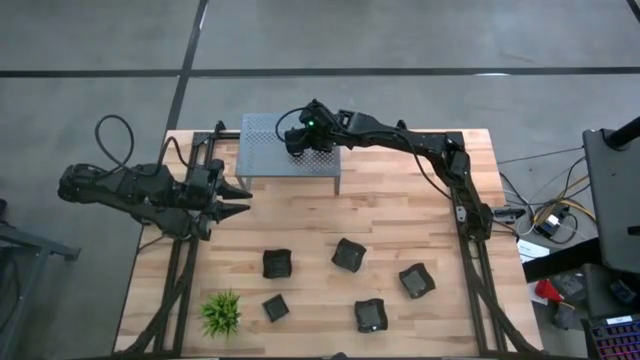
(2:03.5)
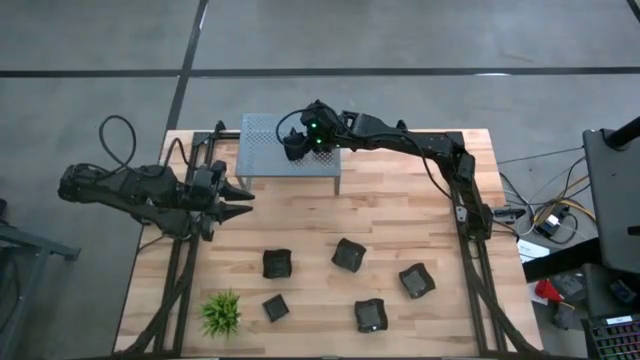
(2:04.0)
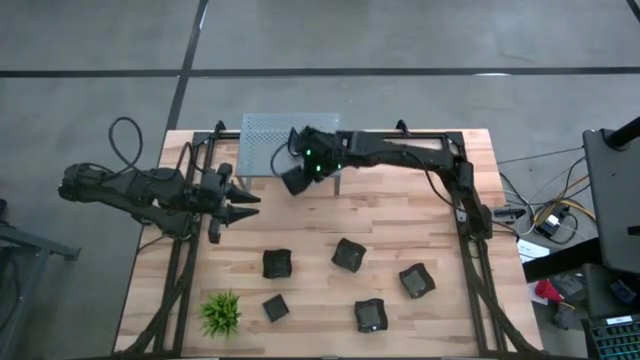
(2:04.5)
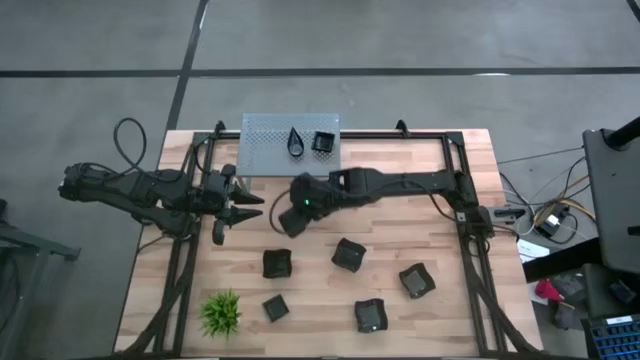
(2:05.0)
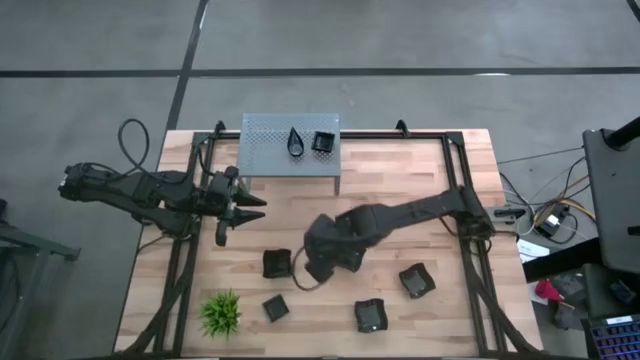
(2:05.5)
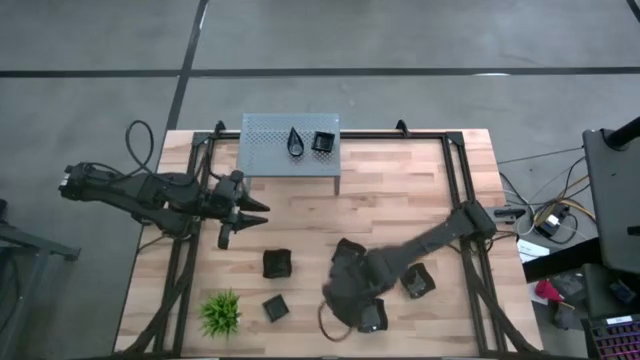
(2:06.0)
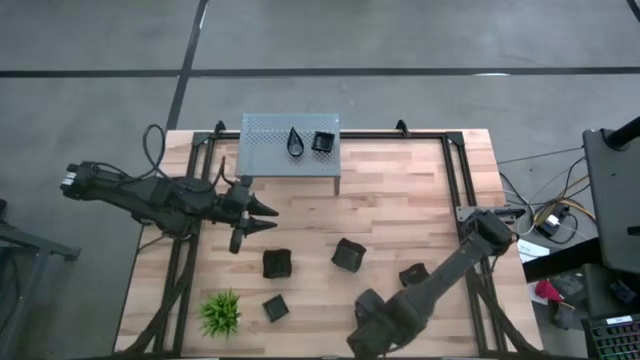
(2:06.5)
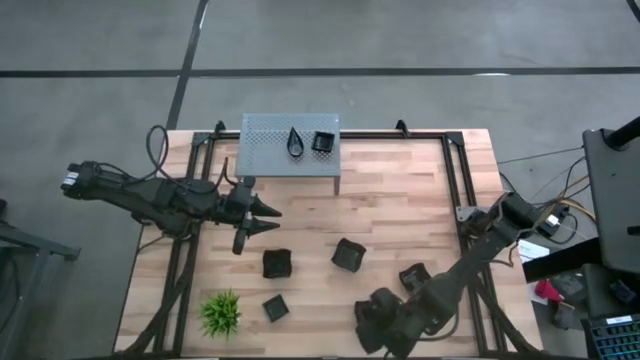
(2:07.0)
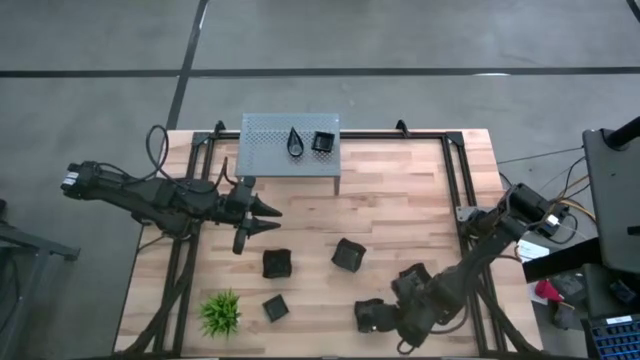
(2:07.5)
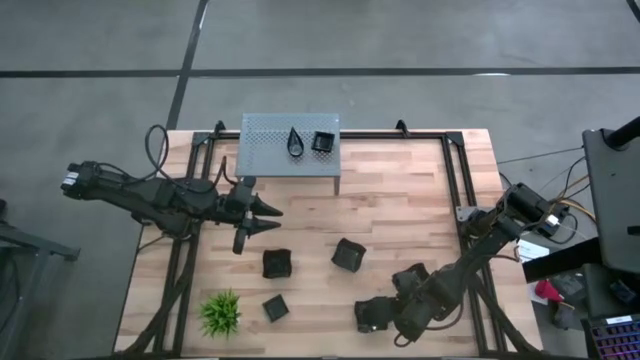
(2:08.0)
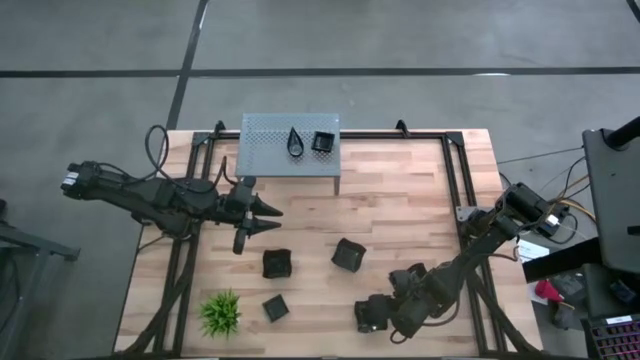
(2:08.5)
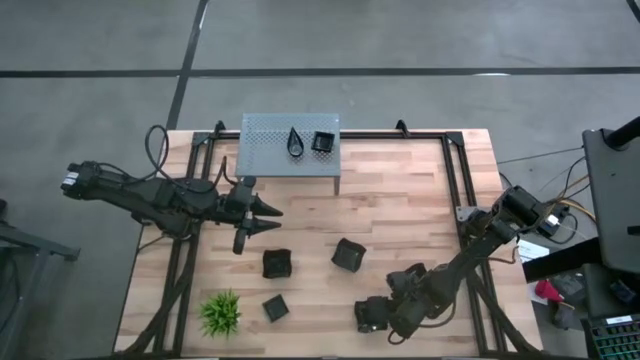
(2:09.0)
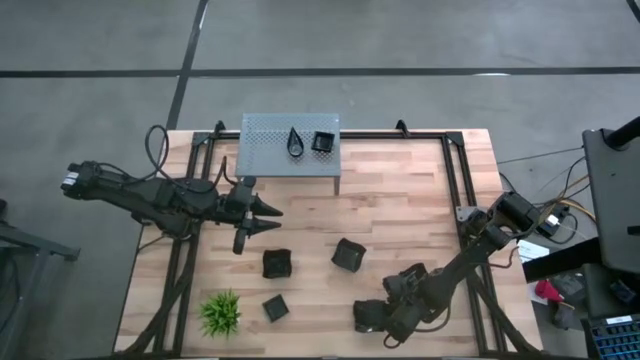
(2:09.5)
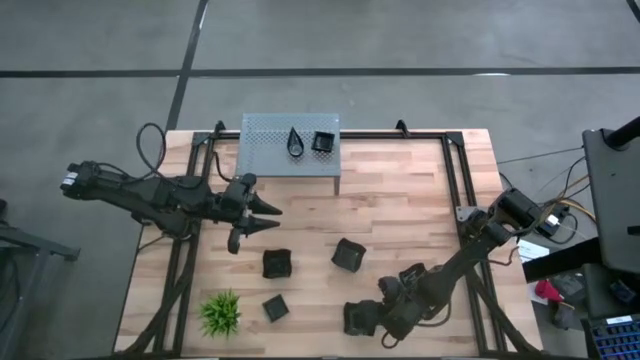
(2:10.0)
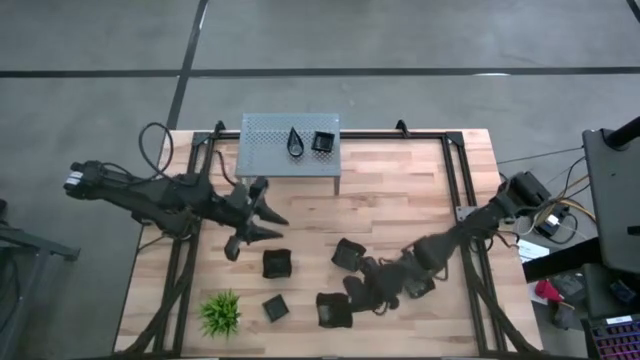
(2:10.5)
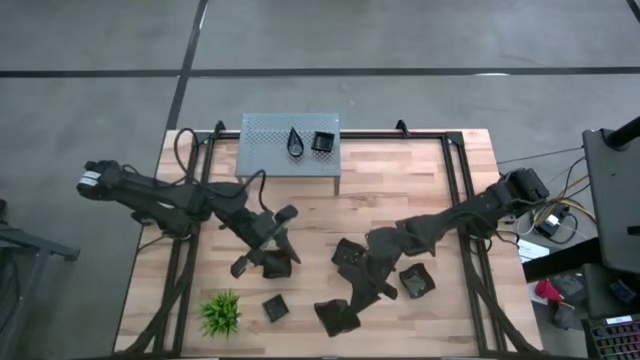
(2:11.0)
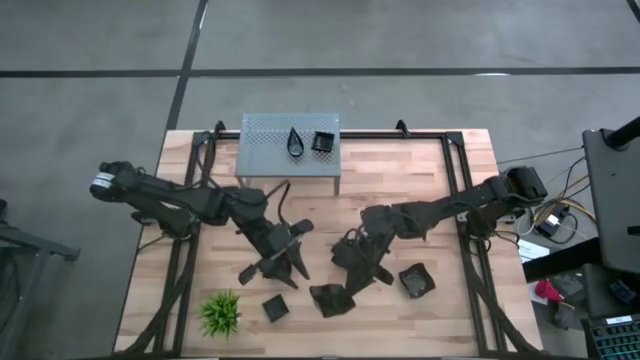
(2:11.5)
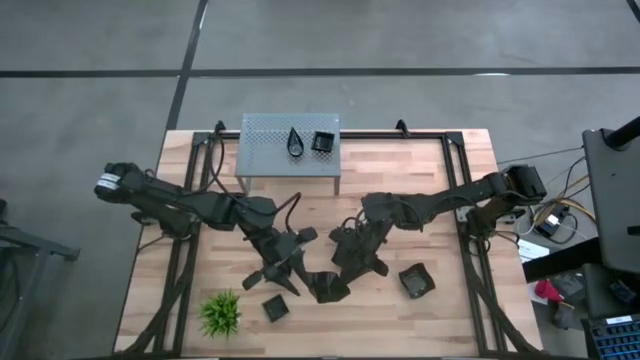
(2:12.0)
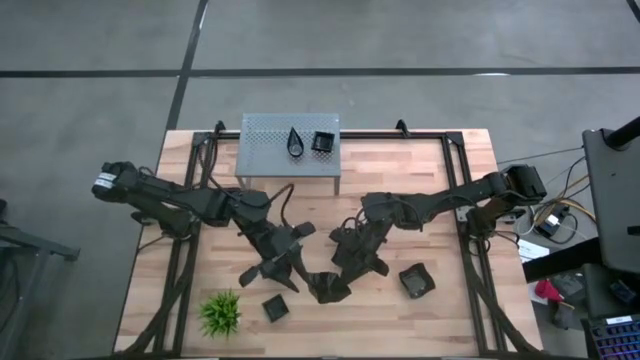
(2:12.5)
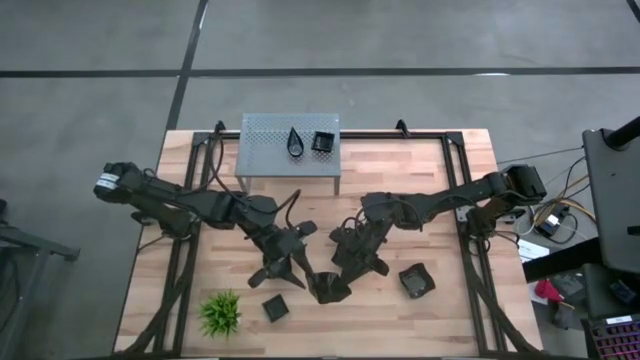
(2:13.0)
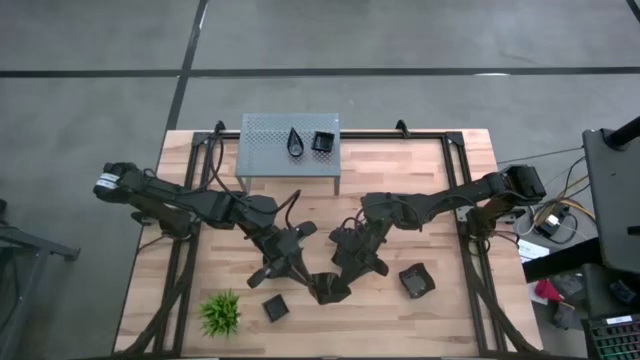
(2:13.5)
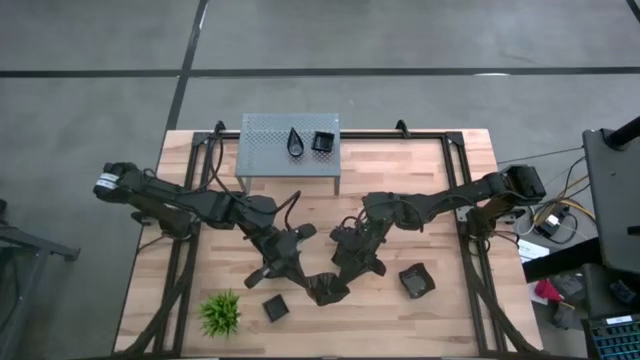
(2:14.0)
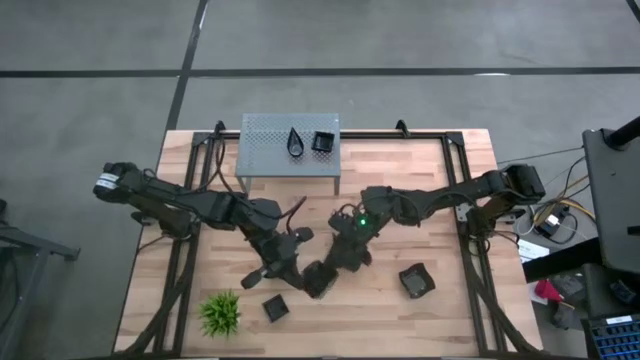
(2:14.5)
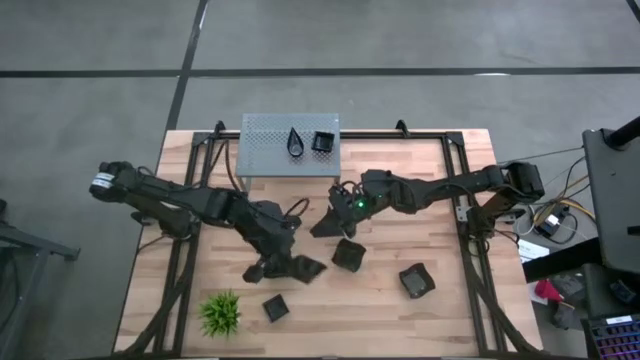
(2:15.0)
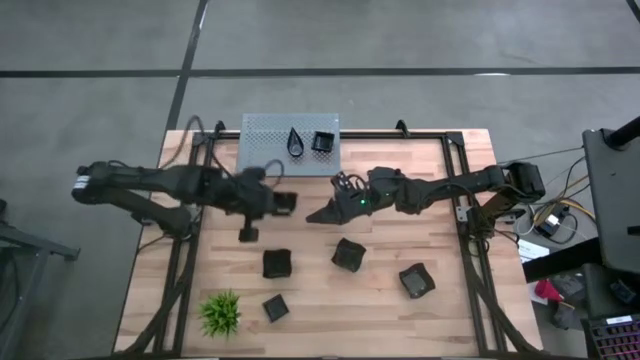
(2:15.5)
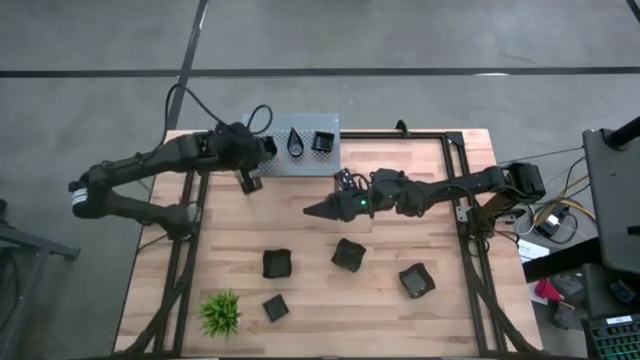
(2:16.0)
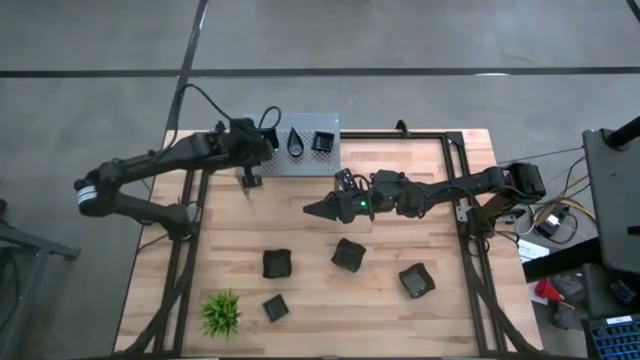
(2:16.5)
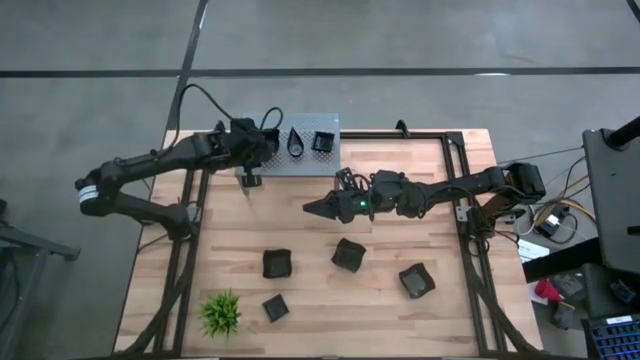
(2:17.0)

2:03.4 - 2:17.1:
Task: Pick & Place Mini shaped plates
Put the bottom right distorted square plate on the left shelf

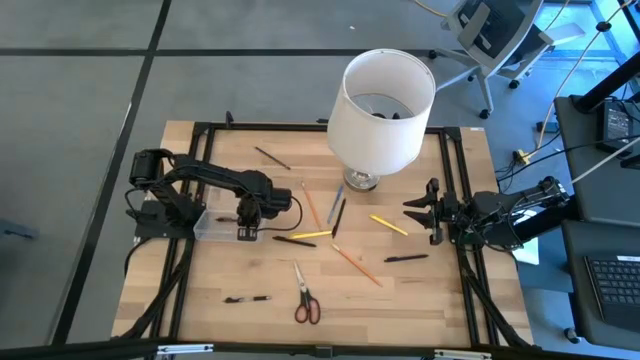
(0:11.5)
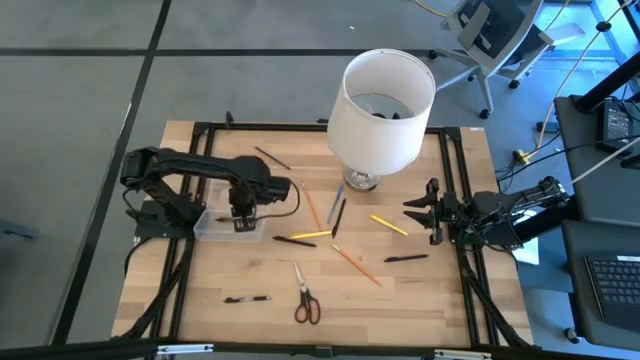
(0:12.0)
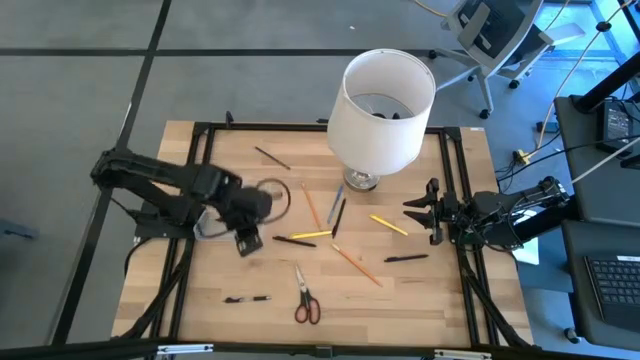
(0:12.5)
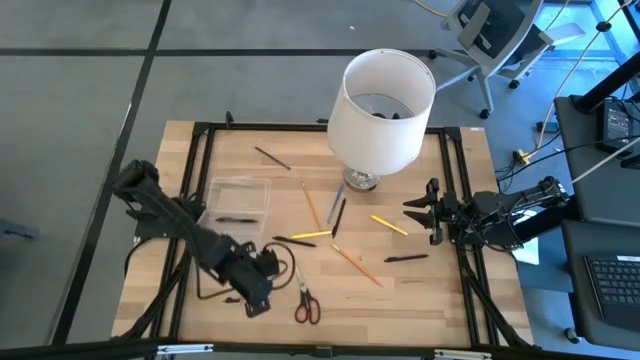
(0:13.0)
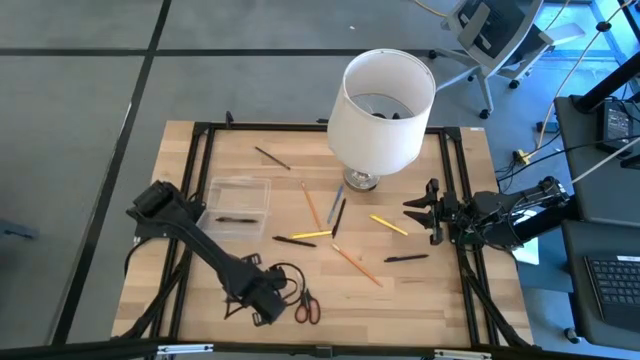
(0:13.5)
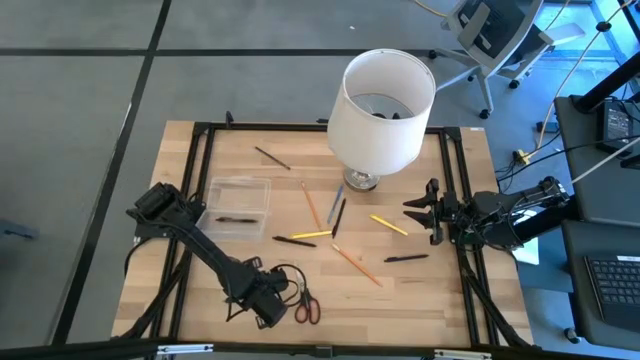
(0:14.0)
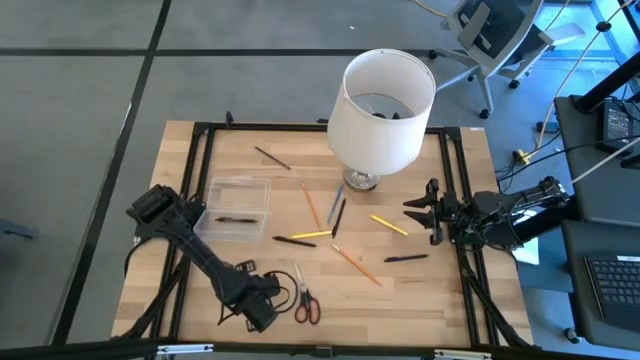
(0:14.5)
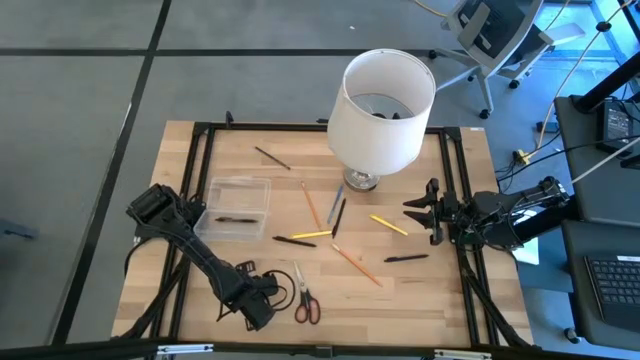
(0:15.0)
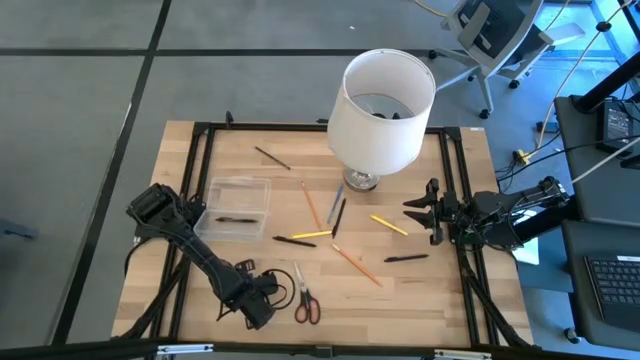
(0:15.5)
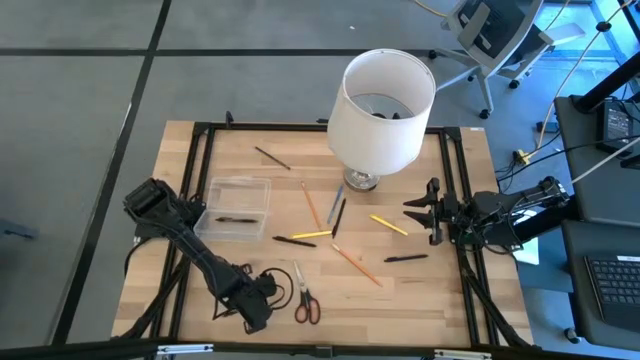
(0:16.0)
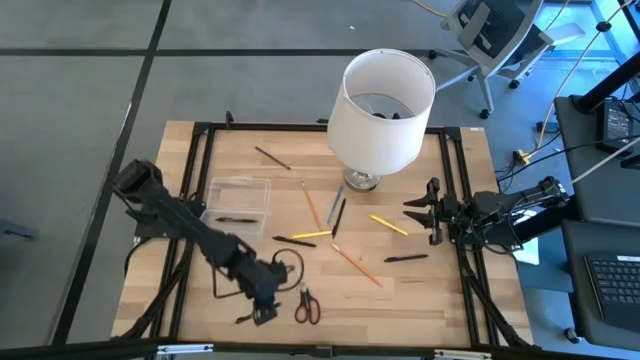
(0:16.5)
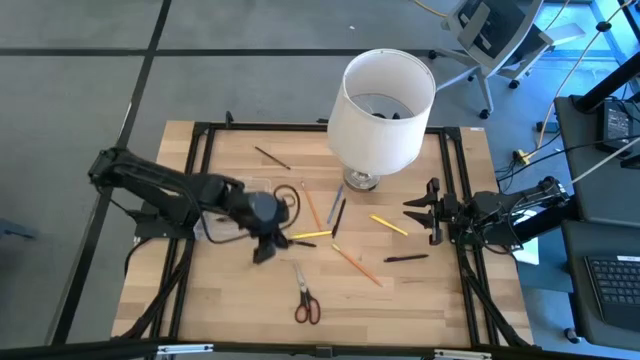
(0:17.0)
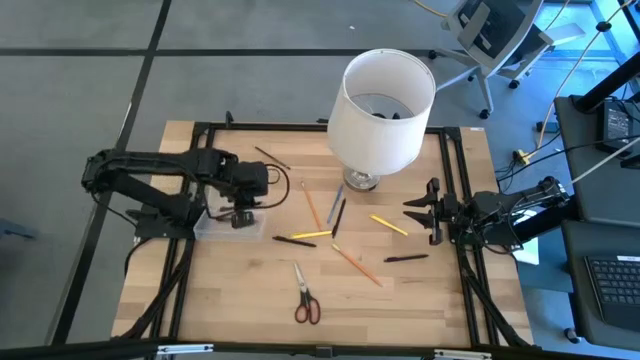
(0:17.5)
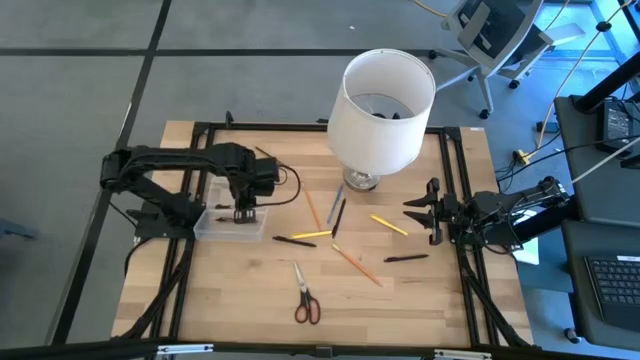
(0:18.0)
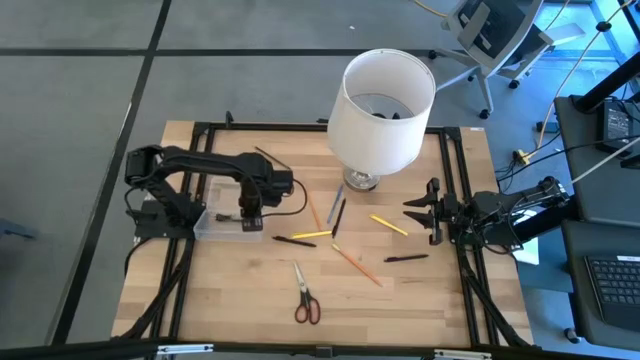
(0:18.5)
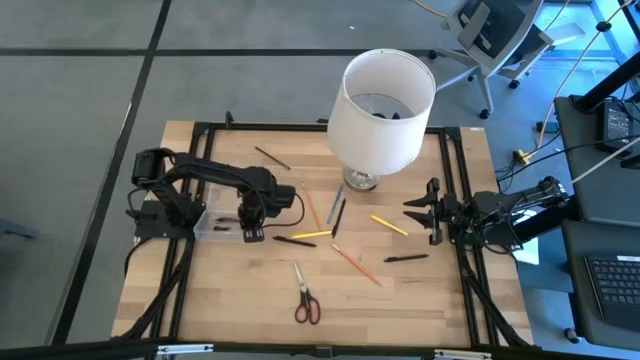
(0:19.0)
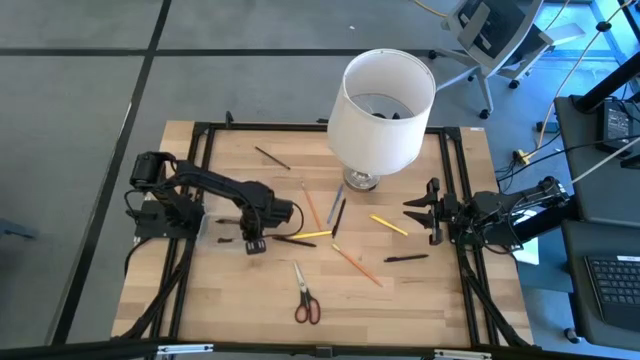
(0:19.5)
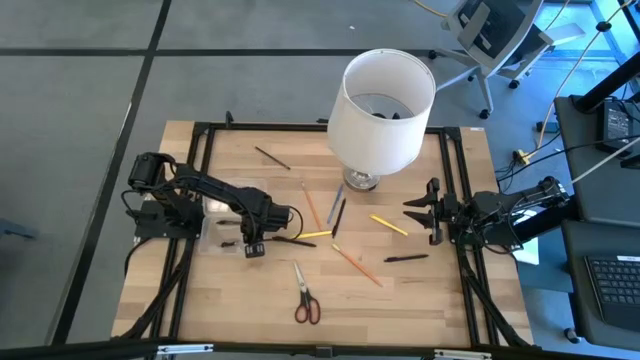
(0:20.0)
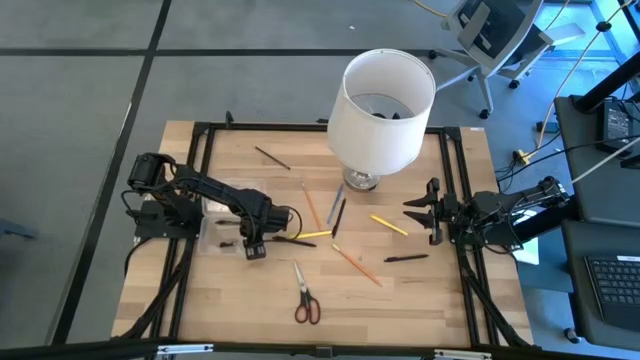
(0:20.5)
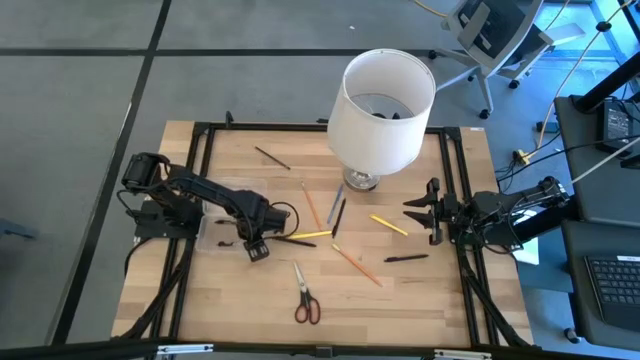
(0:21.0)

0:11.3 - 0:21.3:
Task: Pick & place school supplies into a supply box
Put the black pen into the transparent supply box
